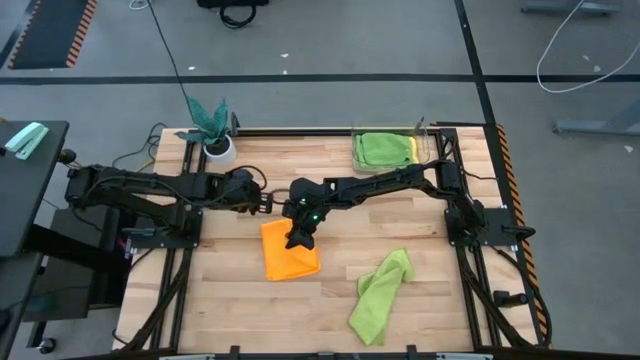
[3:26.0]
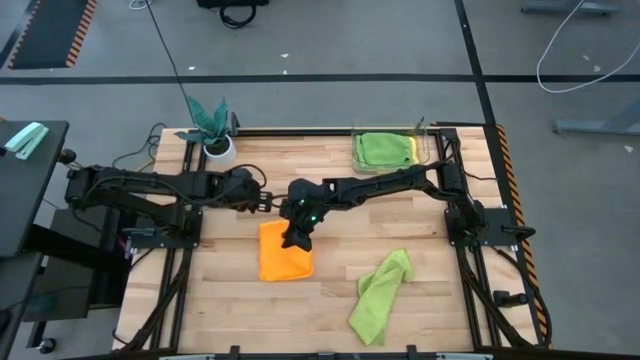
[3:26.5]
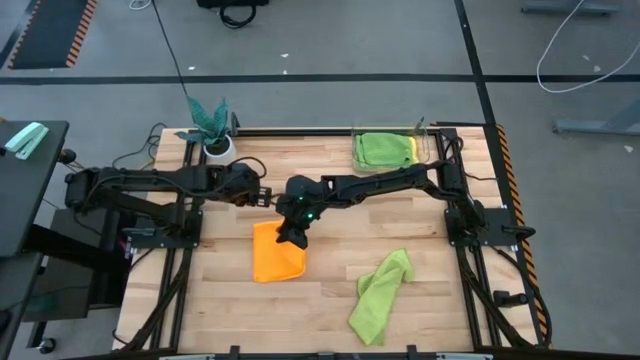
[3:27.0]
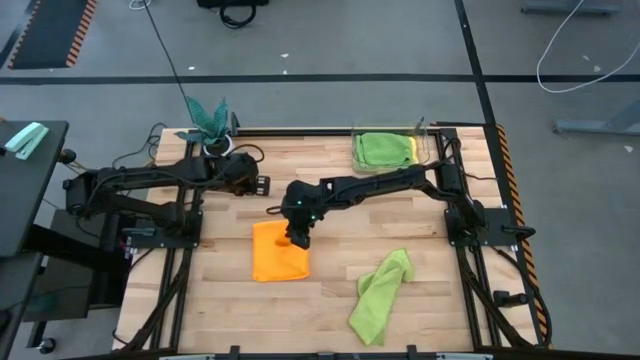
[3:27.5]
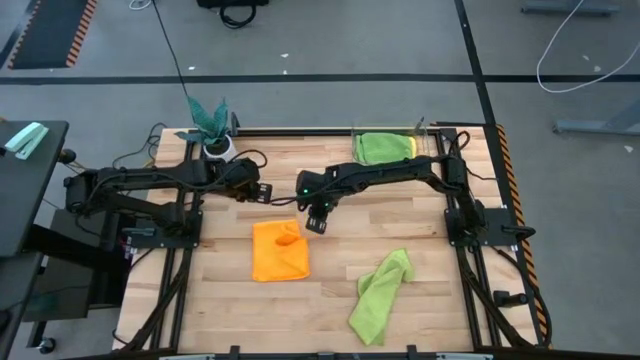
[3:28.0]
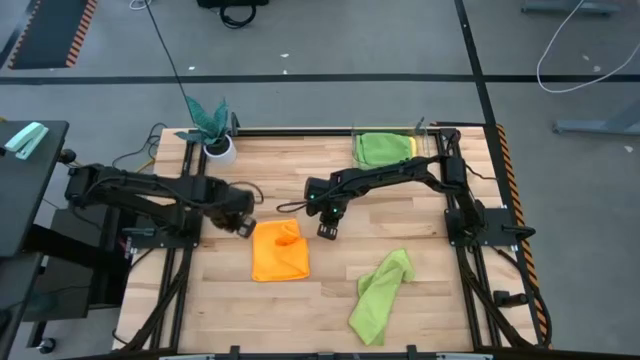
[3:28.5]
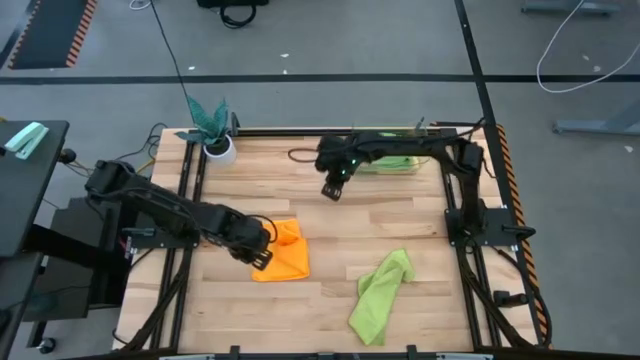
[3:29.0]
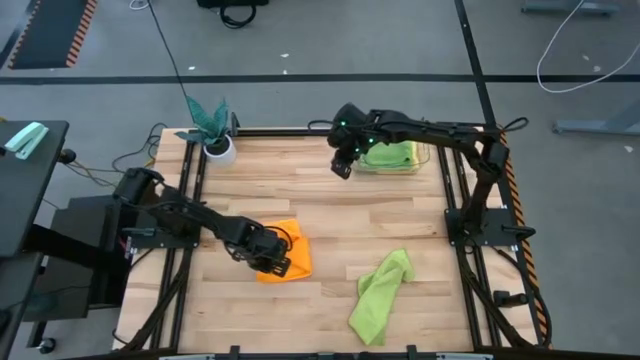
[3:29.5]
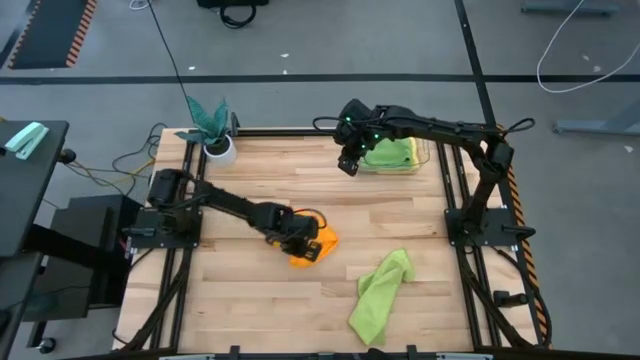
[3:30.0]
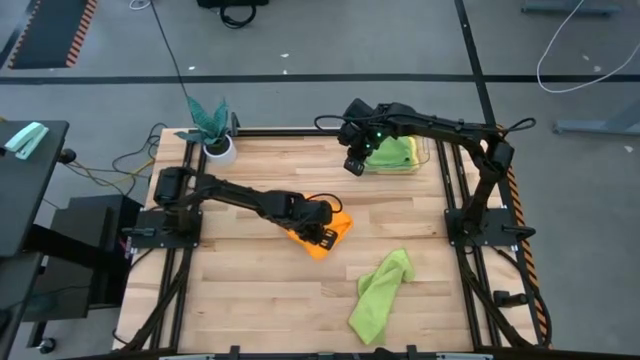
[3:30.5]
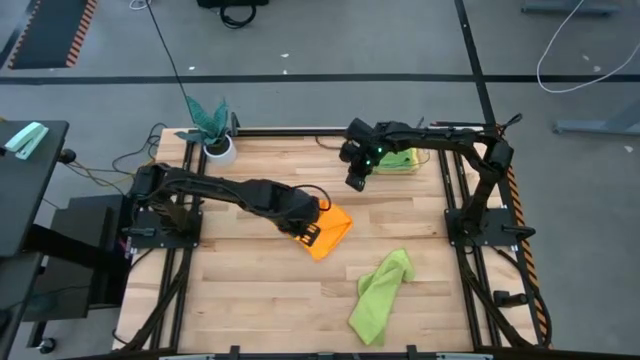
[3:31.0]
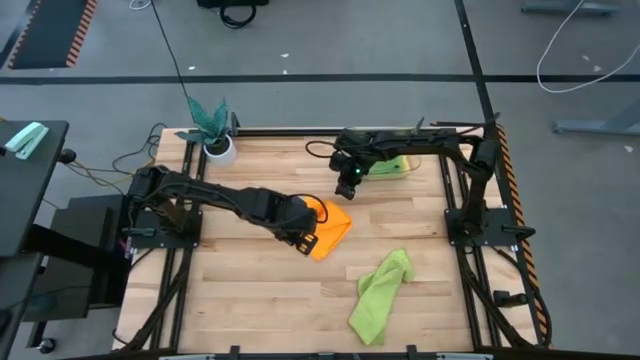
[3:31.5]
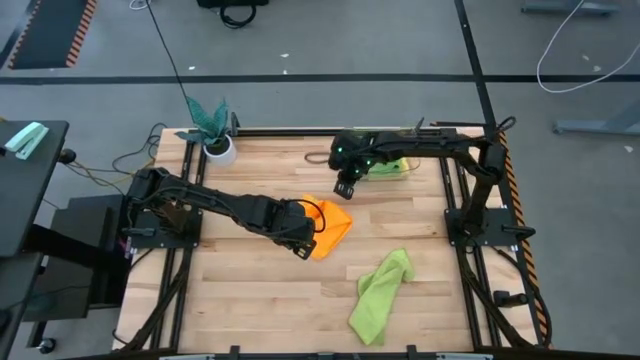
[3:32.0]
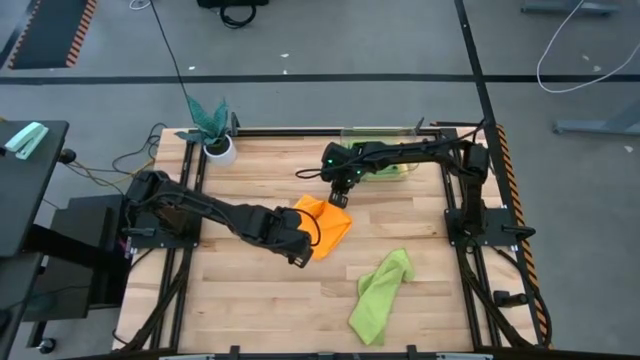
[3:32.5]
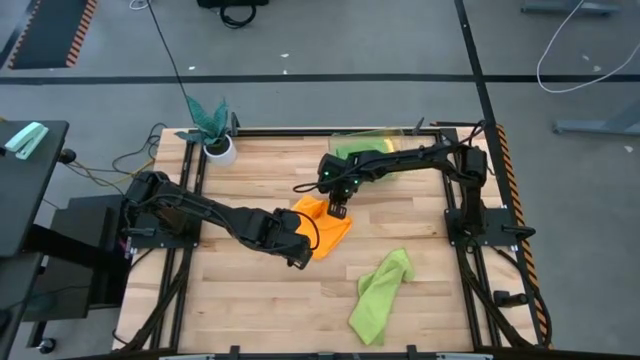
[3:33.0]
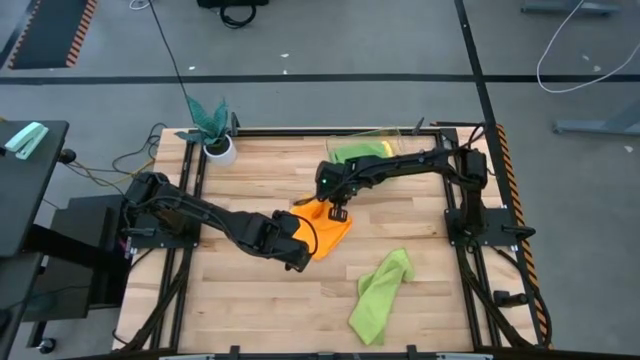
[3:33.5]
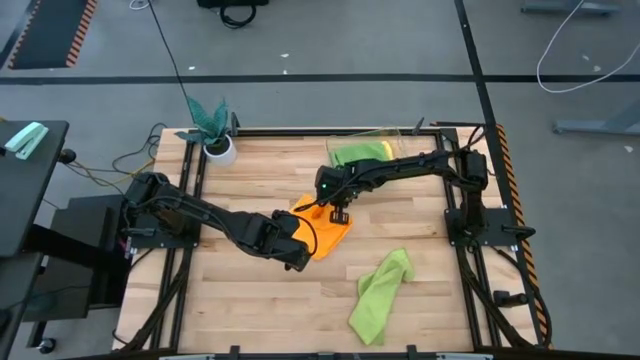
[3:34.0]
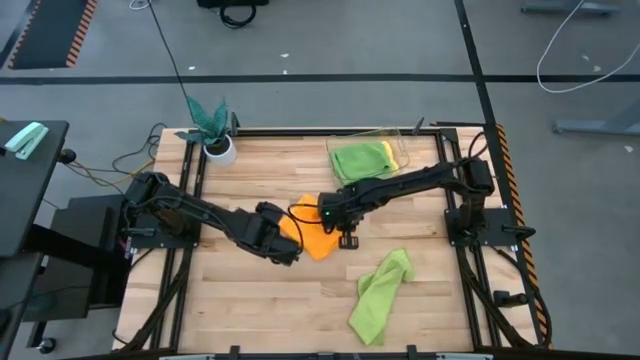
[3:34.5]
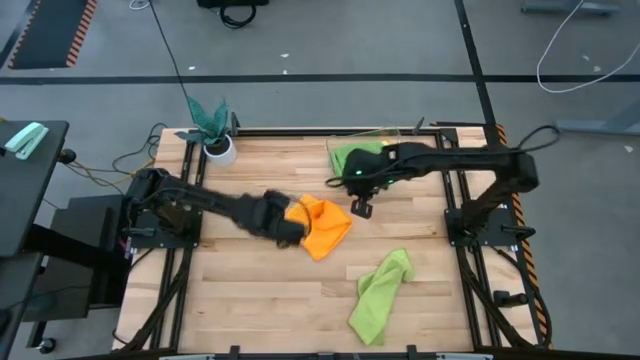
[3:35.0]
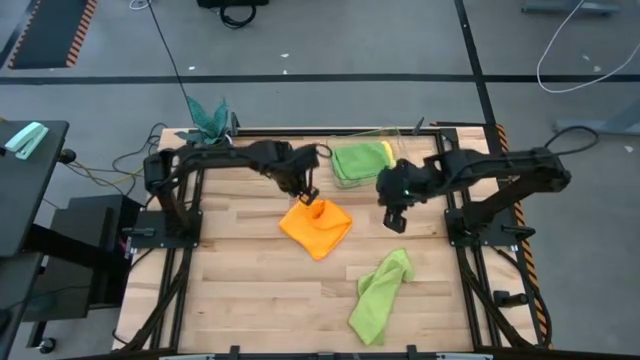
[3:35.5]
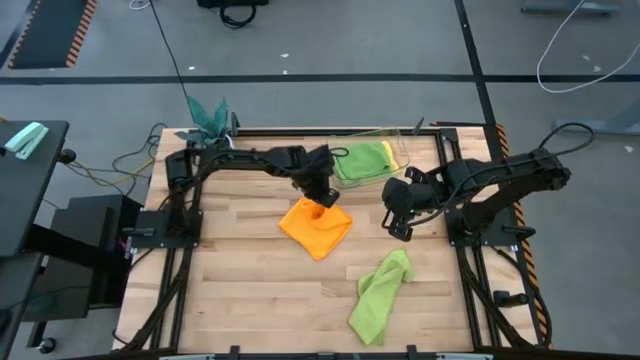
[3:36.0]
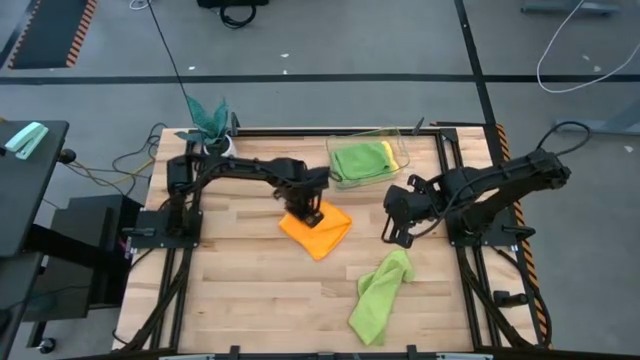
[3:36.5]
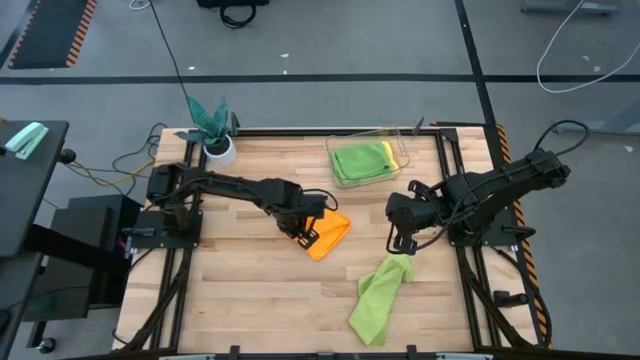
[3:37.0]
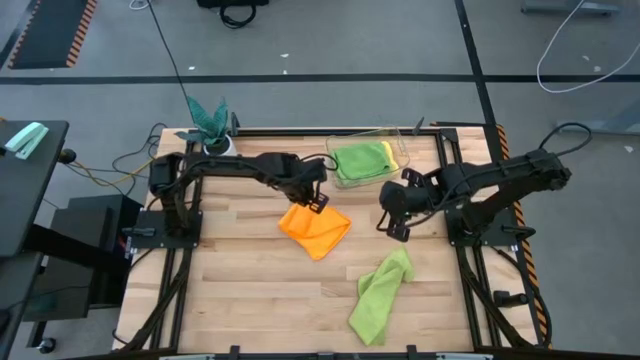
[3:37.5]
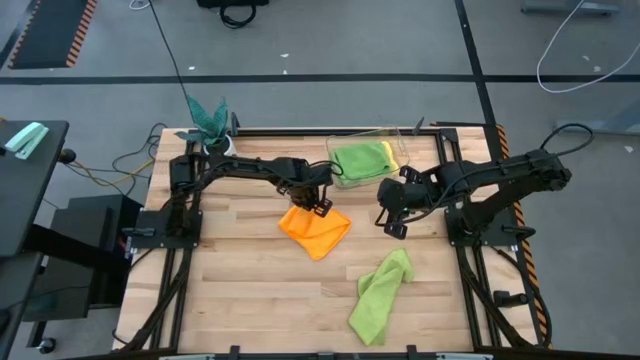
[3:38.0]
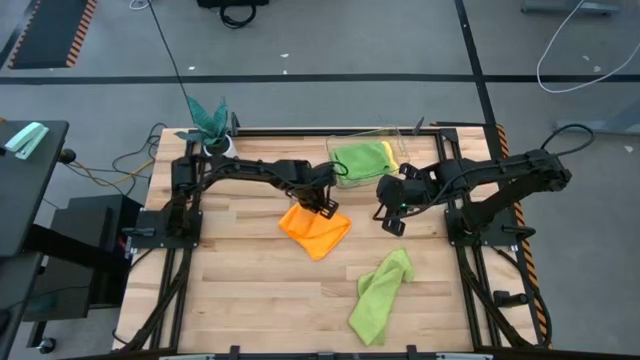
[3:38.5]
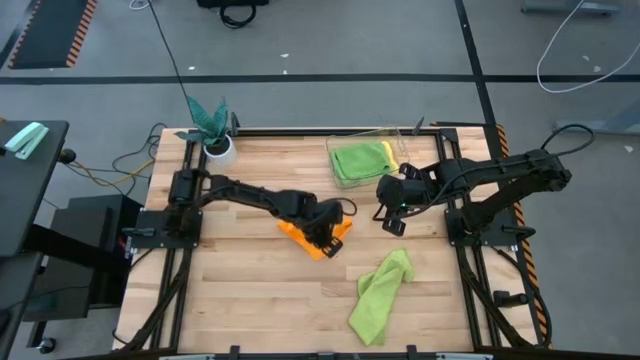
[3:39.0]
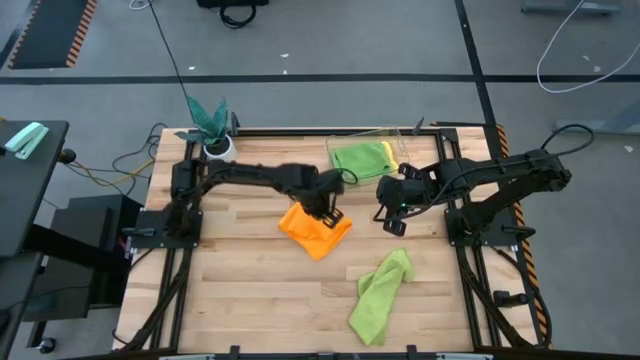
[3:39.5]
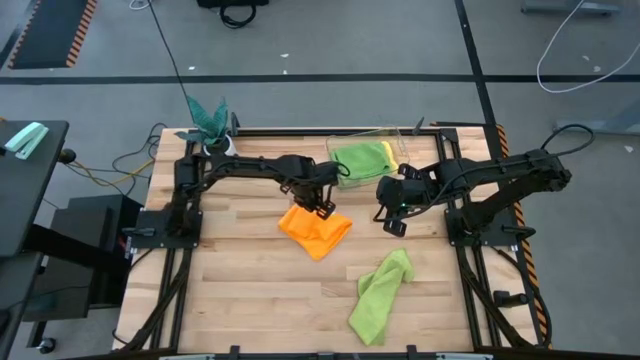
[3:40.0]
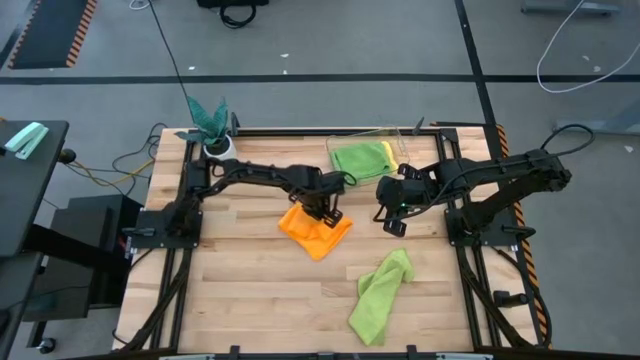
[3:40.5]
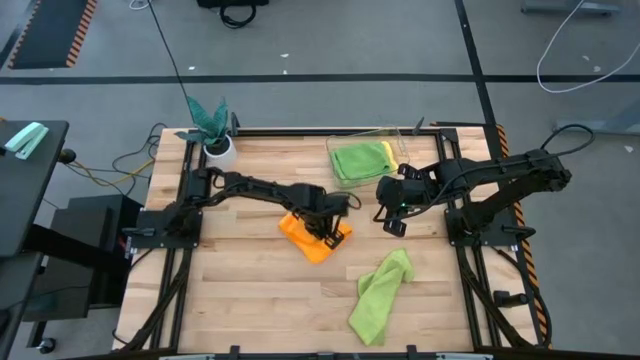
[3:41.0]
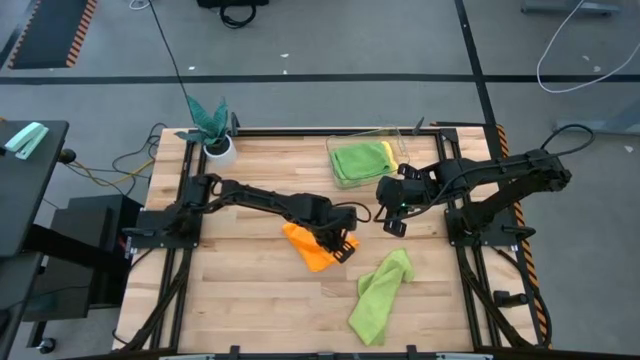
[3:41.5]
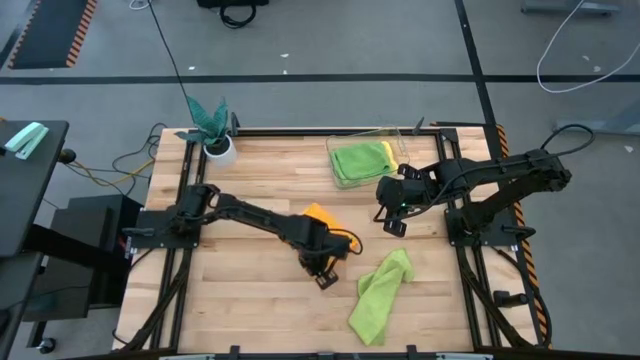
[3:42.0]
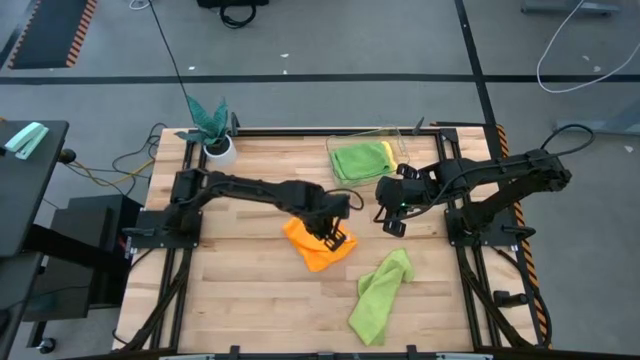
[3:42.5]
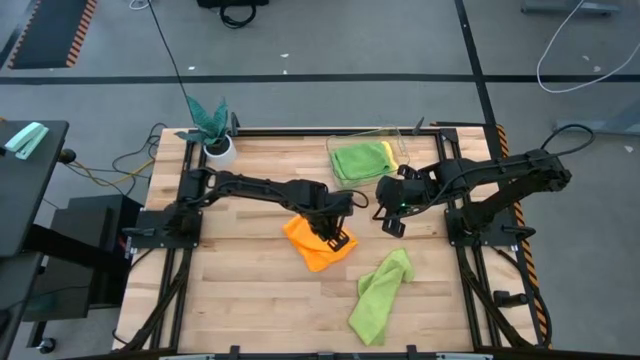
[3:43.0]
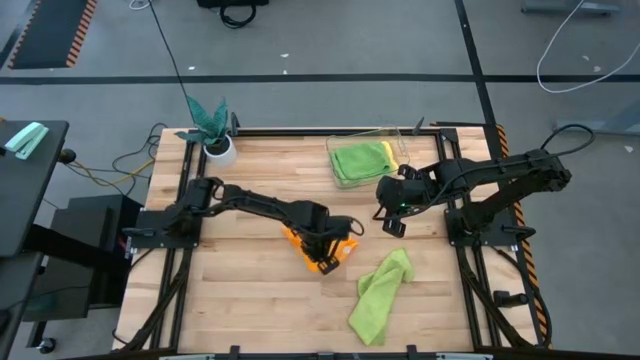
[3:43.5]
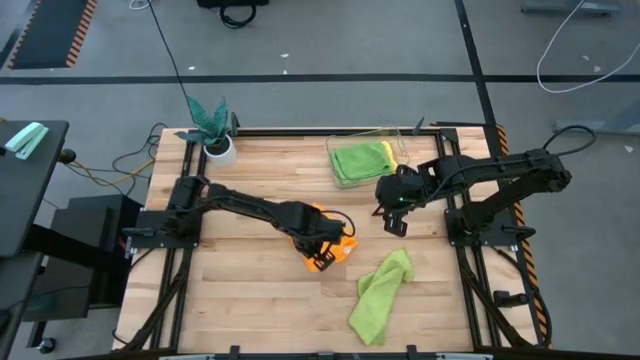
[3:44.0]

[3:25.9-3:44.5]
Task: Fold microfiber towels
Fold the orange towel

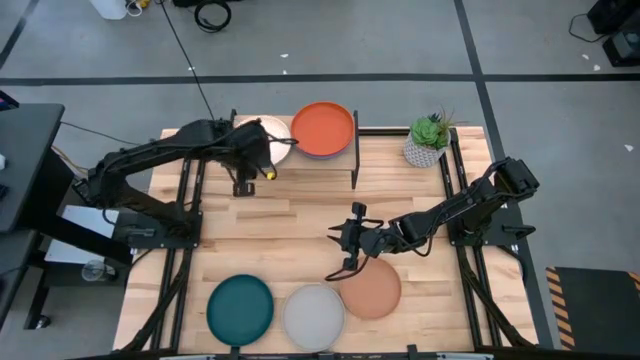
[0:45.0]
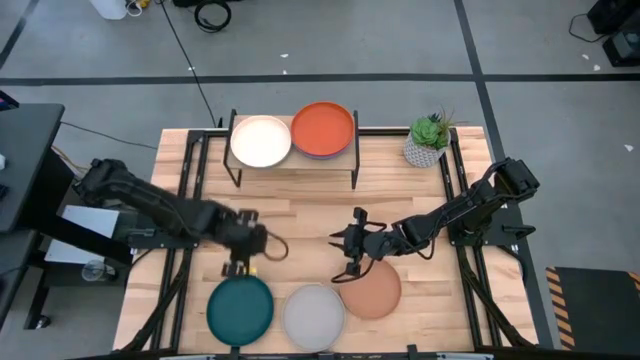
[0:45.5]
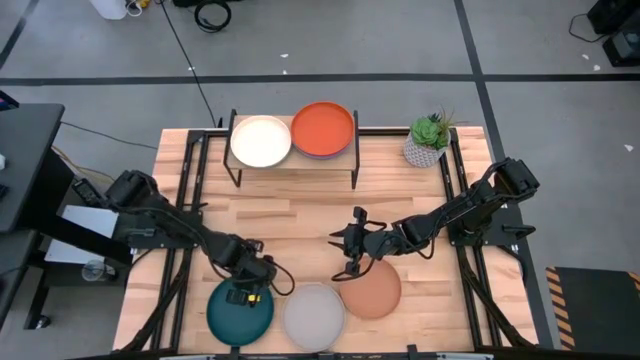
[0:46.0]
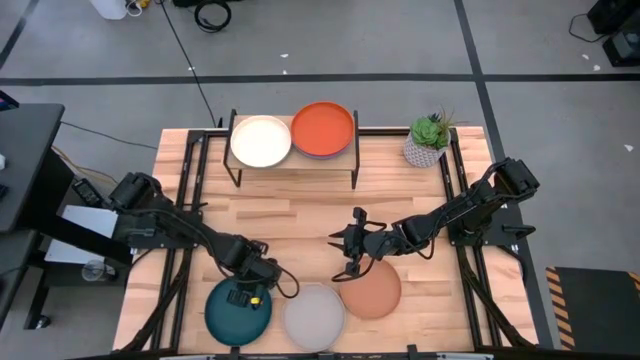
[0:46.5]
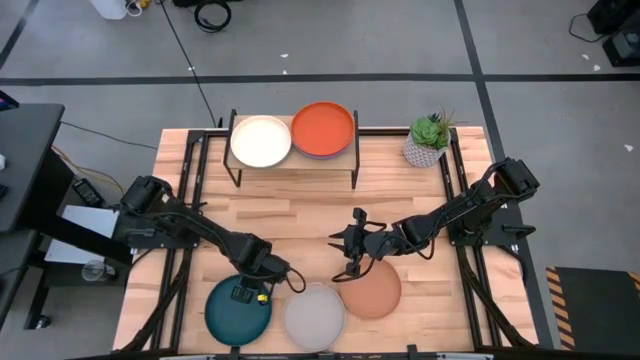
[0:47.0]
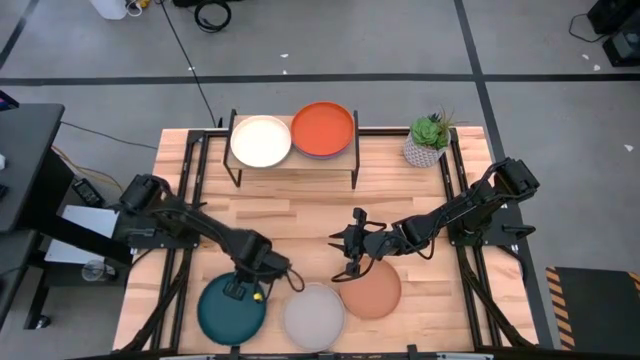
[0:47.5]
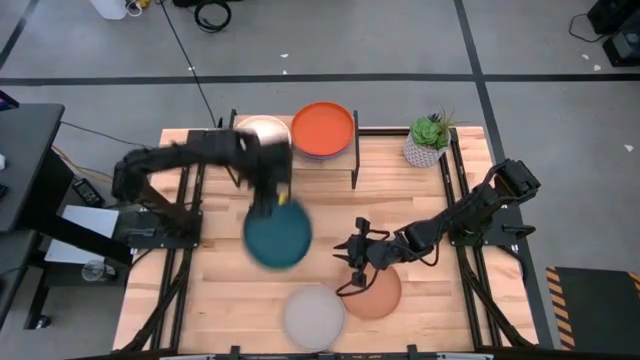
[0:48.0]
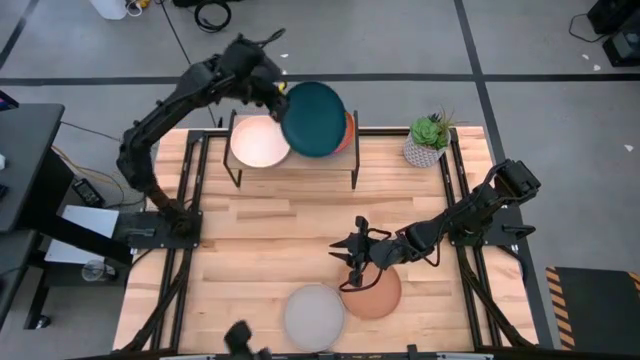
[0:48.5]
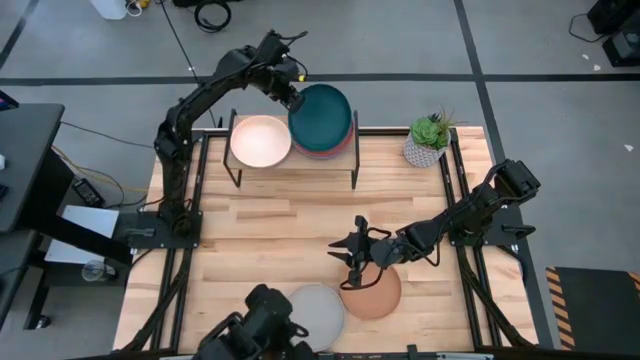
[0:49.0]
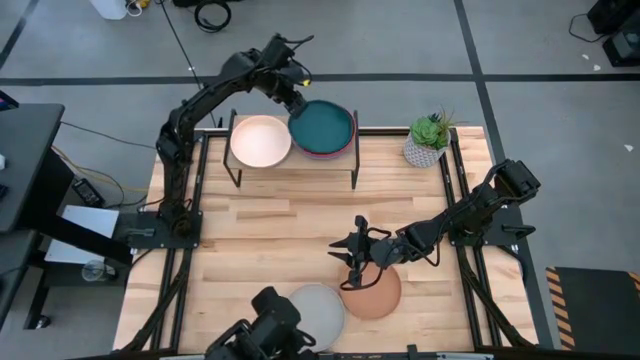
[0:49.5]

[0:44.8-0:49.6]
Task: Place and stack plates onto a shelf
Stack the green plate on top of the orange plate on the shelf
